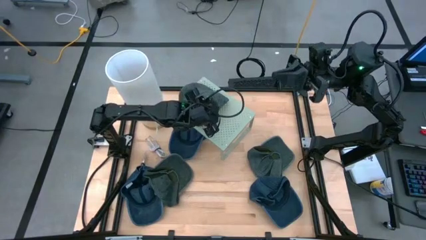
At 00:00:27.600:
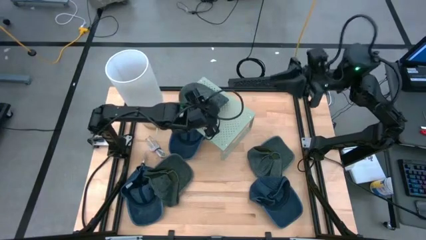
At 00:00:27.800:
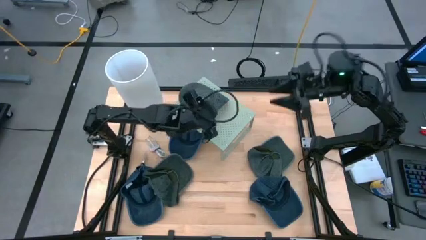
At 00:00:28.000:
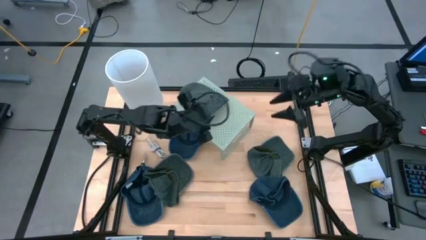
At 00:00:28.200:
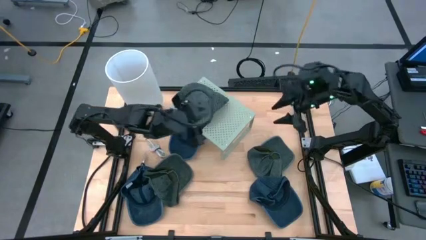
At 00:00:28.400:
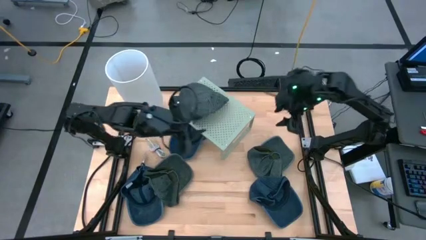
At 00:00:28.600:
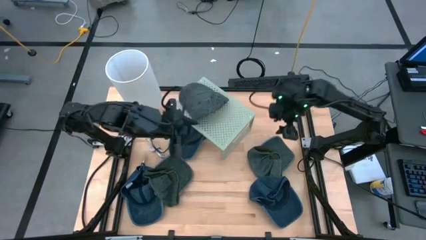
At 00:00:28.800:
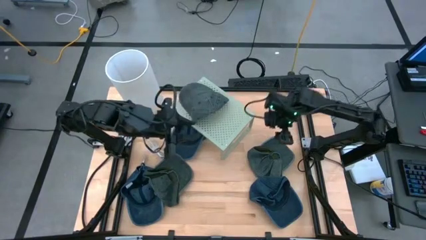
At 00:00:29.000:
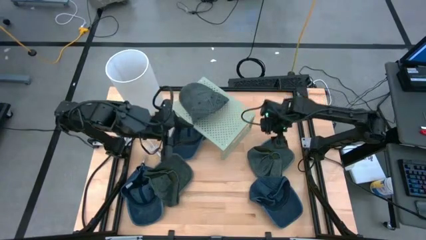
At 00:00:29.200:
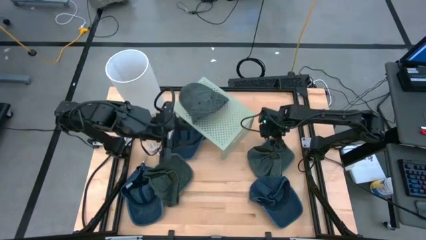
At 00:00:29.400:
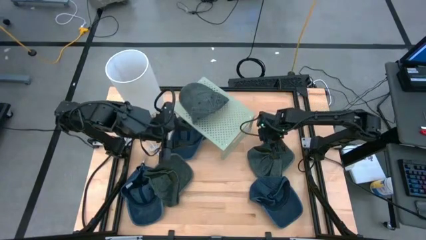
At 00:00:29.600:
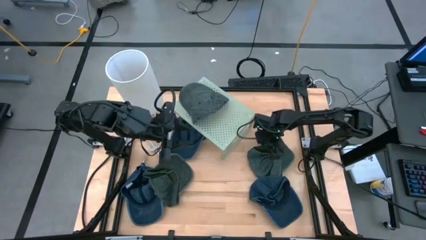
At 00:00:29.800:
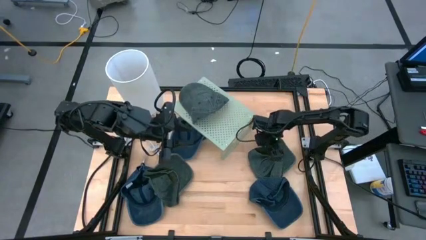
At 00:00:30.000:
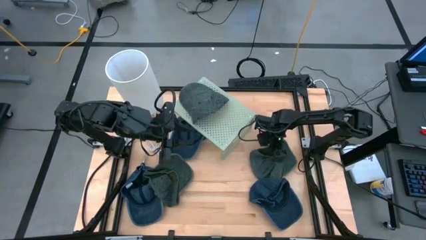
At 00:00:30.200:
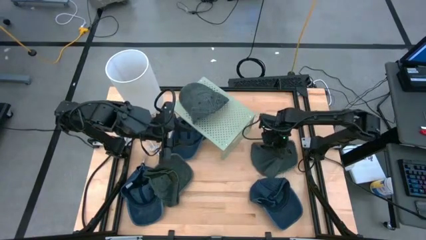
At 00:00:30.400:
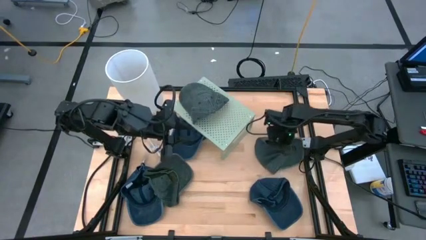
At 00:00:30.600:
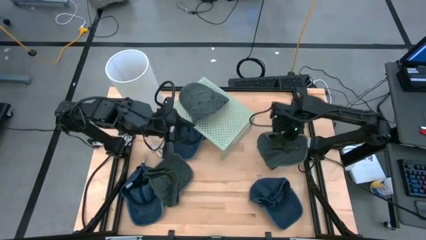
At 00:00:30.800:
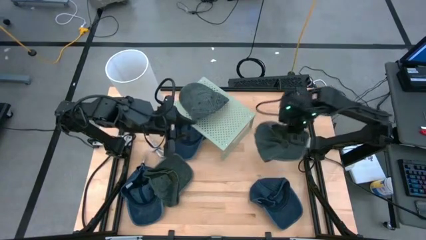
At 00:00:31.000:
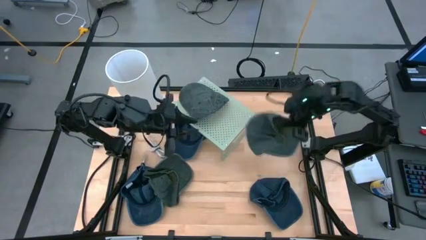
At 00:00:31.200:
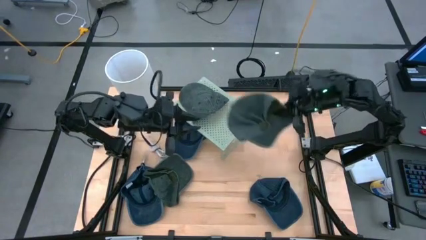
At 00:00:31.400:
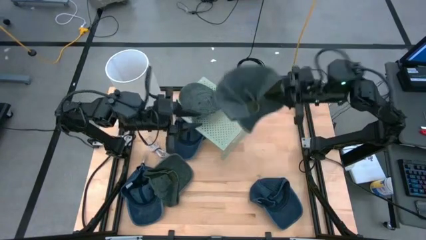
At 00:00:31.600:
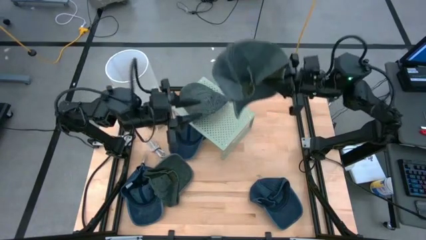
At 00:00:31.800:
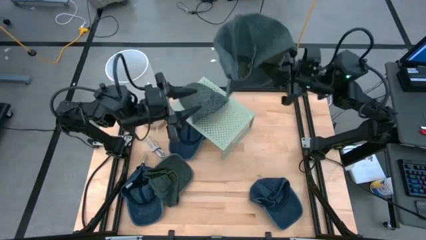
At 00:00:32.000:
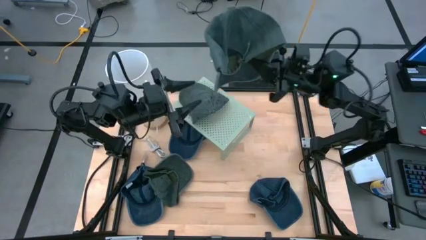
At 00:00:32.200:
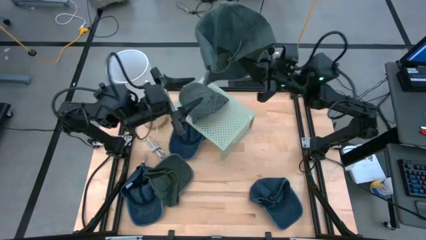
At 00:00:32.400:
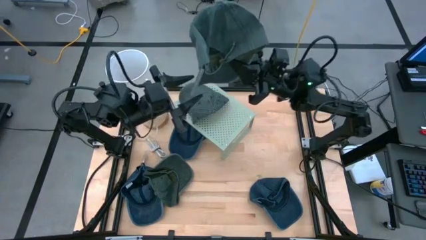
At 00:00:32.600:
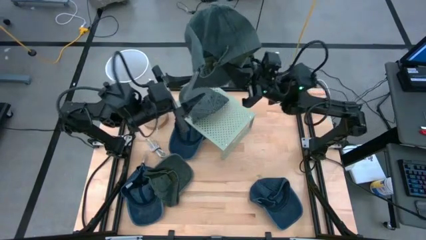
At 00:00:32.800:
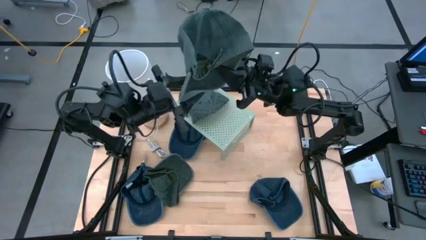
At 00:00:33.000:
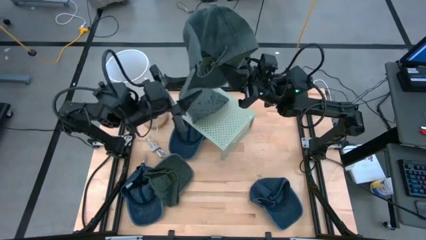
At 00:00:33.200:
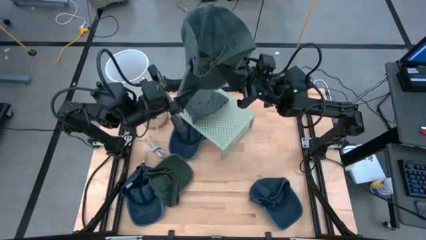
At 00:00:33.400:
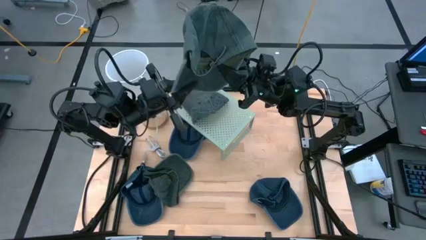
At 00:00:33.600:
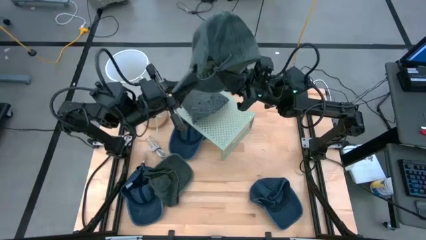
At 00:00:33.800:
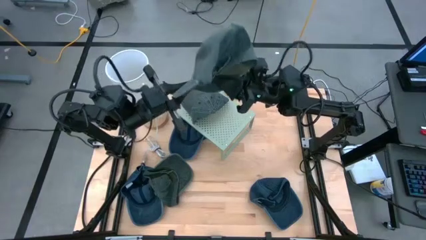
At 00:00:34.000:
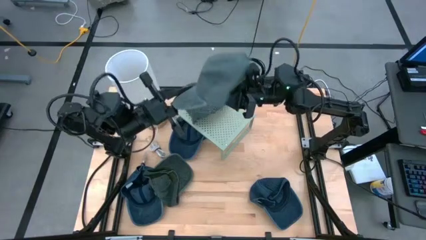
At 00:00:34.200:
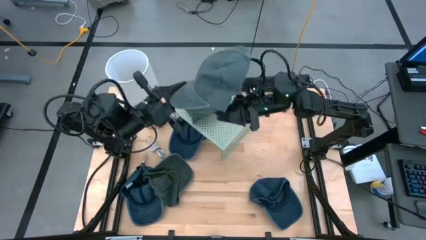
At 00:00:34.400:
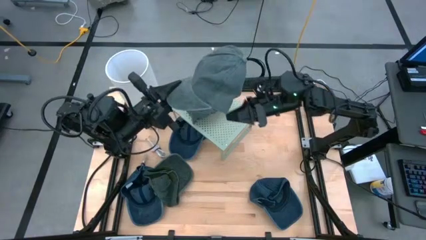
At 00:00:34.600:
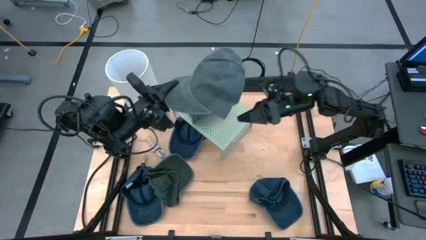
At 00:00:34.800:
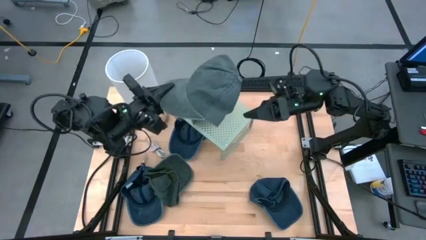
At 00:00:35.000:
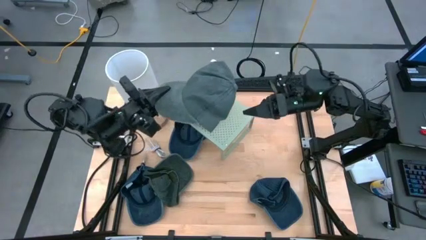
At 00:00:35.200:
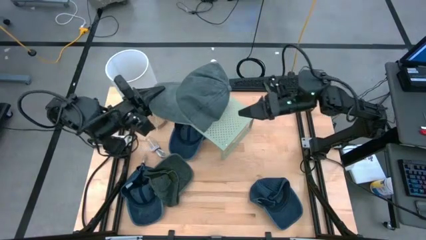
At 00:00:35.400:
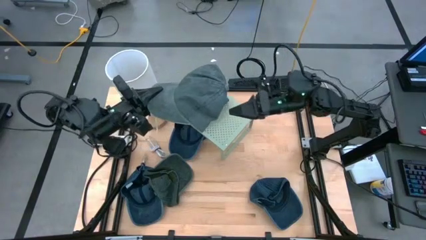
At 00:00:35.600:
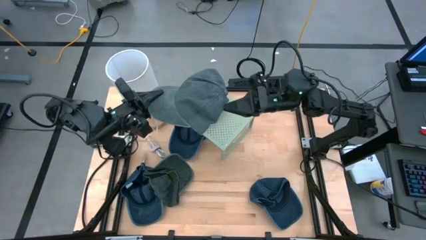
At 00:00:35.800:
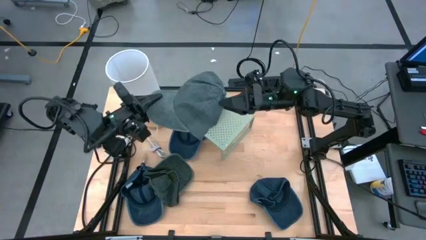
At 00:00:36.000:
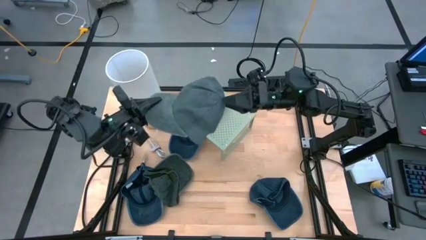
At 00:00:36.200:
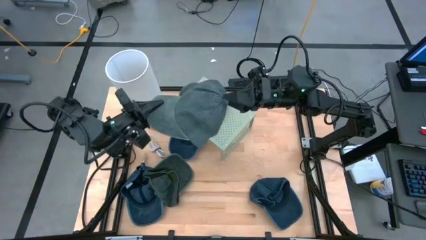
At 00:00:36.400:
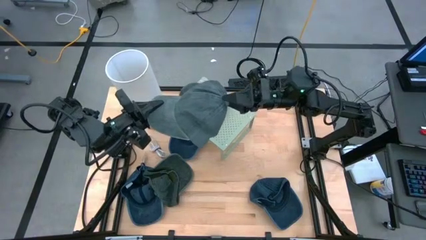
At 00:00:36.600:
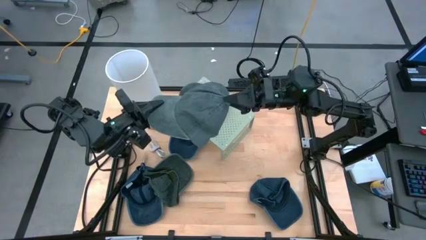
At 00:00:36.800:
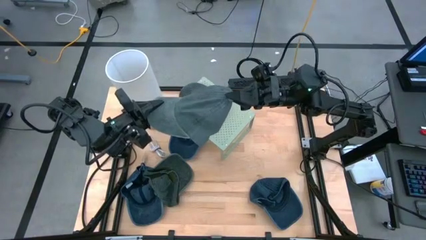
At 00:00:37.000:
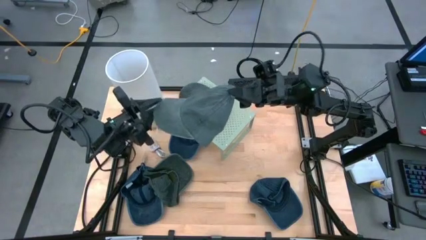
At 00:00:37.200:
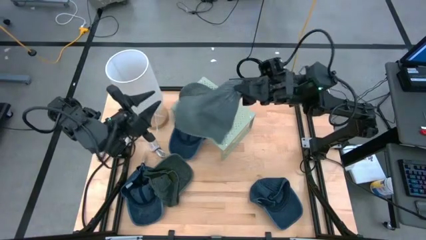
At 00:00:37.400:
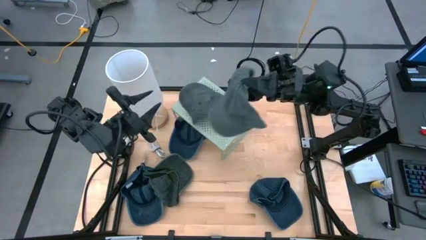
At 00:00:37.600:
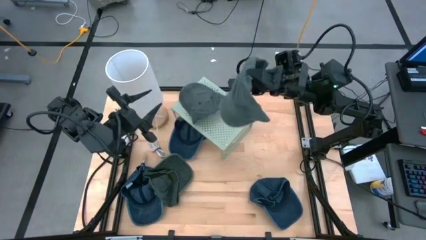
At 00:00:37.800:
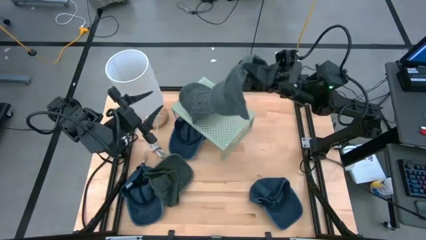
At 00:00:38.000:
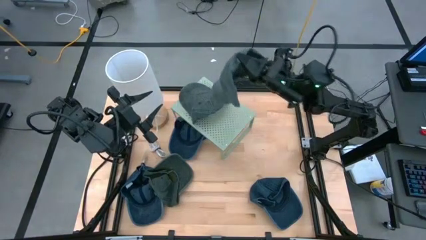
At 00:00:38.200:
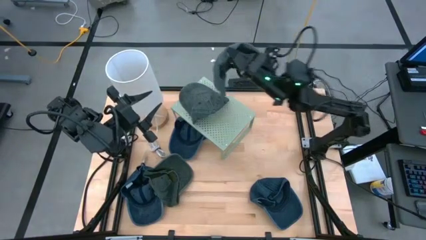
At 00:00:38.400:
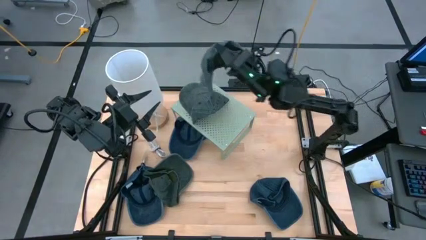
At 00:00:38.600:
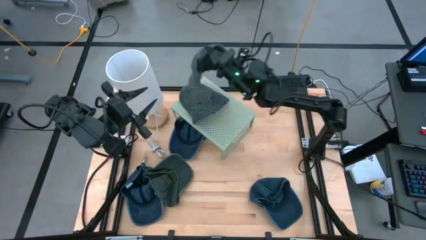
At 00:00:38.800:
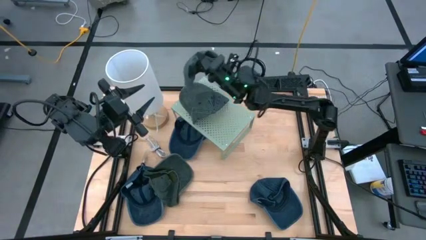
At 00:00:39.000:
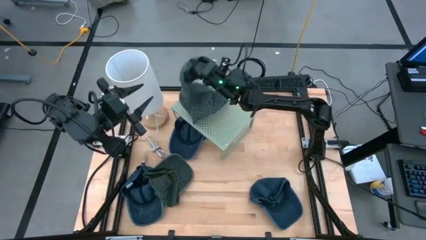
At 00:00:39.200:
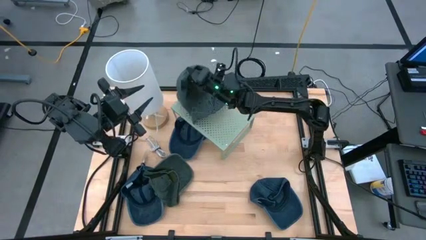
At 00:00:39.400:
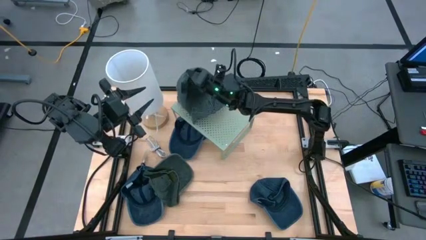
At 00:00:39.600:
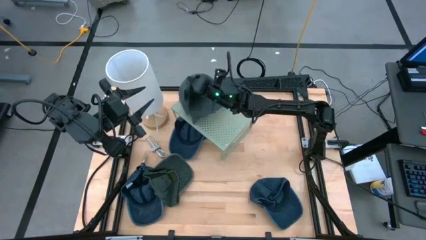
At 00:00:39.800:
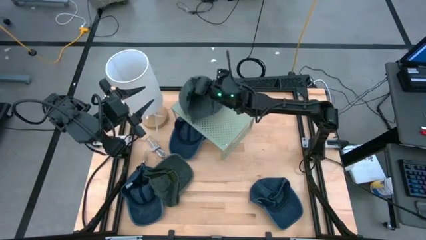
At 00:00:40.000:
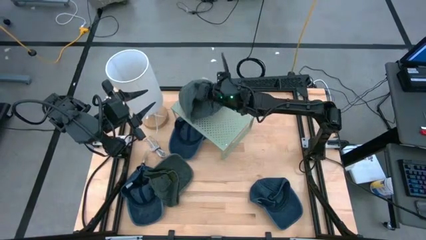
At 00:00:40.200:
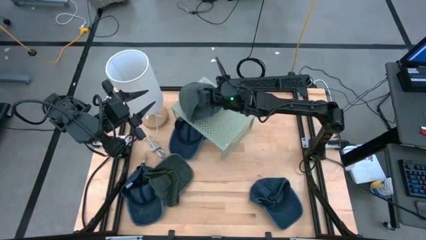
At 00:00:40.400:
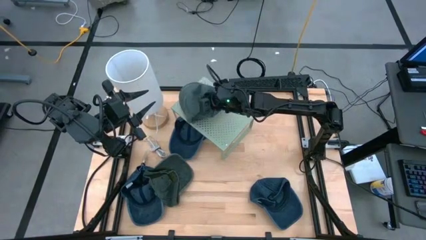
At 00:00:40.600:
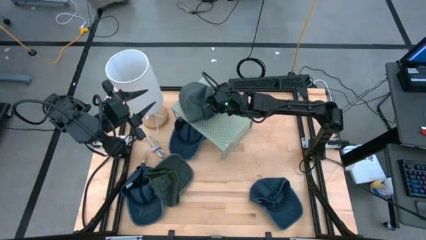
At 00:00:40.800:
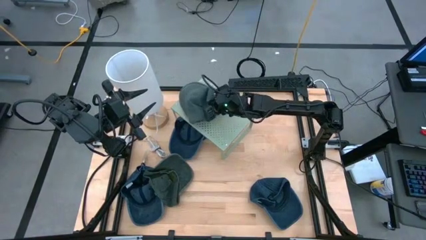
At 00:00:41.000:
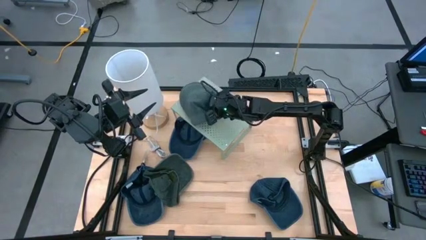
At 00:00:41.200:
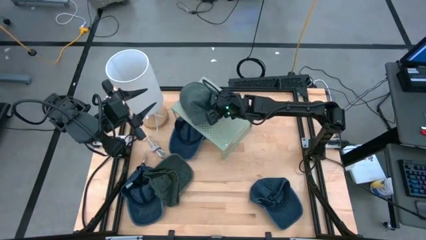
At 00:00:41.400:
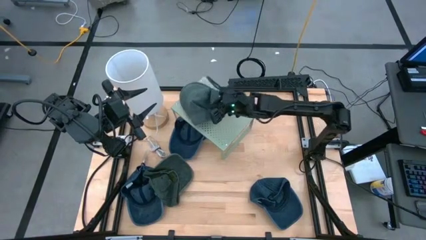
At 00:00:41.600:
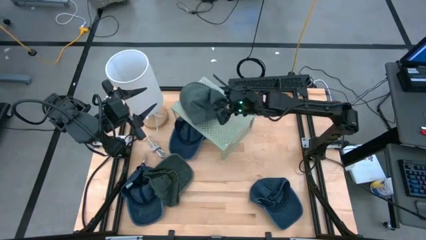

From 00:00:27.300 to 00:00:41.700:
Task: Pick & Place hat
Stack the right black cap on top of the black cap on the shelf
